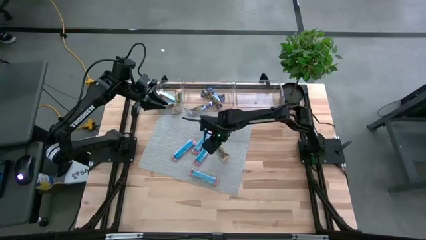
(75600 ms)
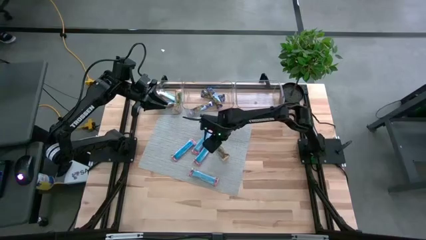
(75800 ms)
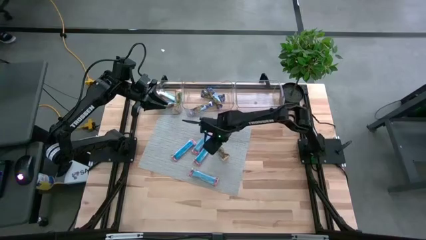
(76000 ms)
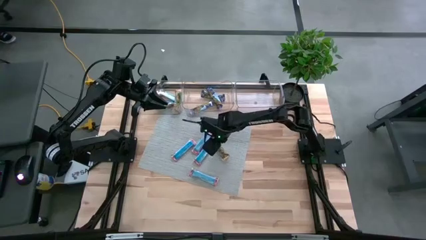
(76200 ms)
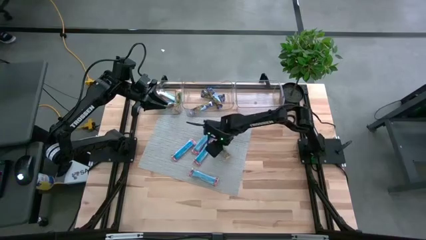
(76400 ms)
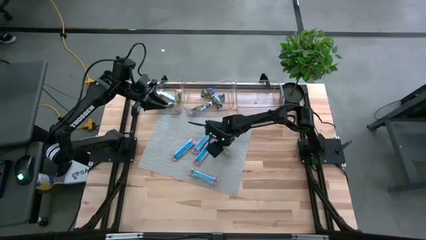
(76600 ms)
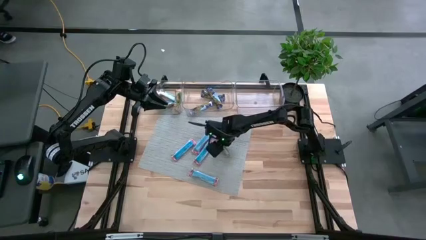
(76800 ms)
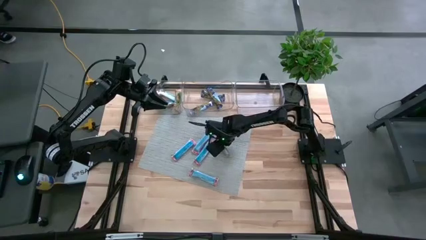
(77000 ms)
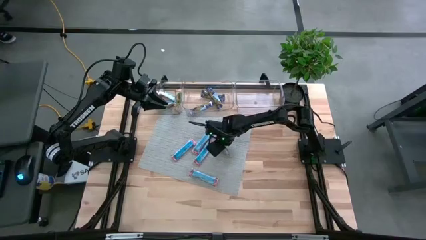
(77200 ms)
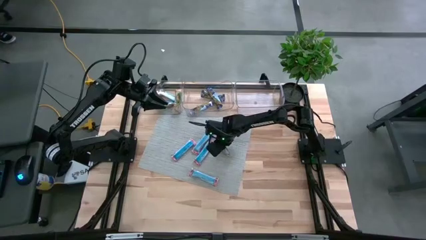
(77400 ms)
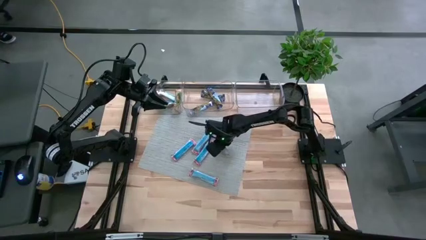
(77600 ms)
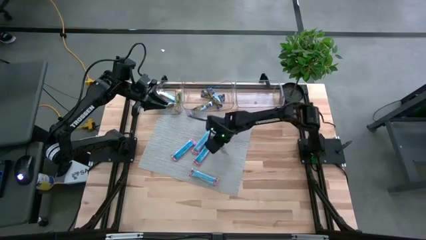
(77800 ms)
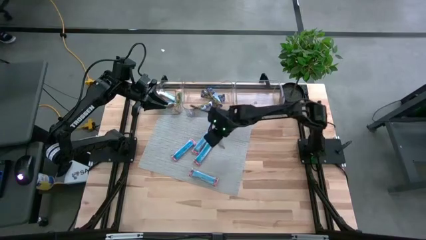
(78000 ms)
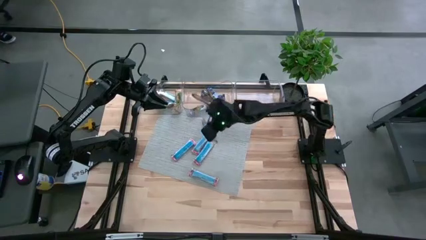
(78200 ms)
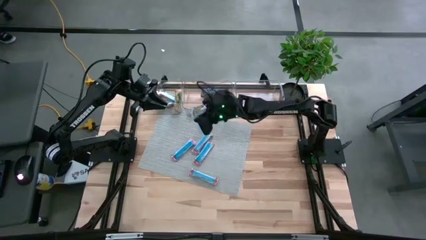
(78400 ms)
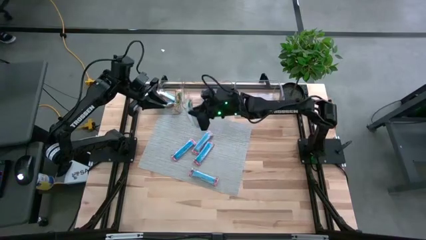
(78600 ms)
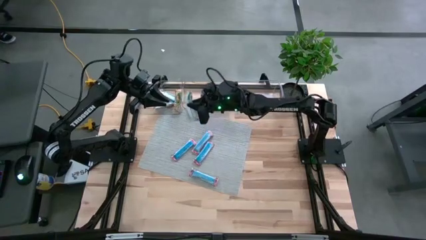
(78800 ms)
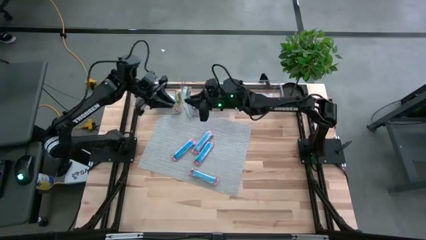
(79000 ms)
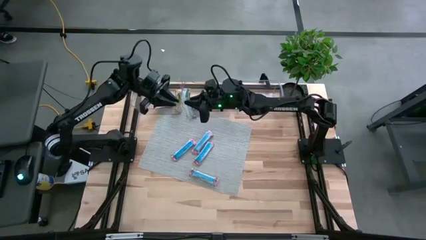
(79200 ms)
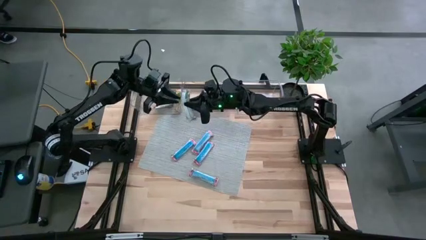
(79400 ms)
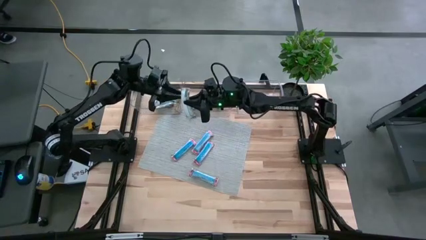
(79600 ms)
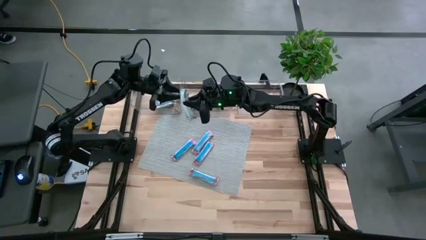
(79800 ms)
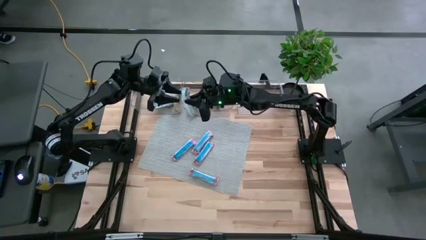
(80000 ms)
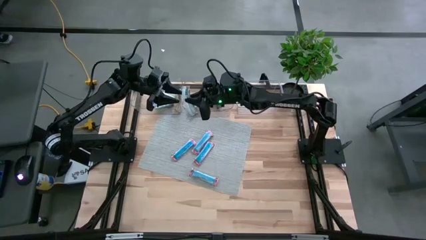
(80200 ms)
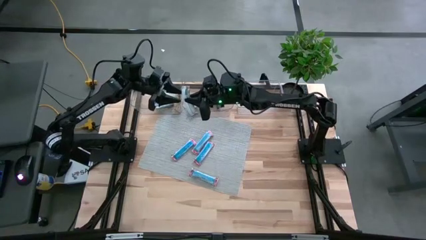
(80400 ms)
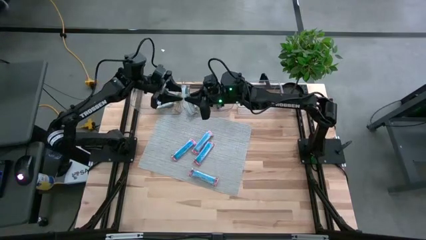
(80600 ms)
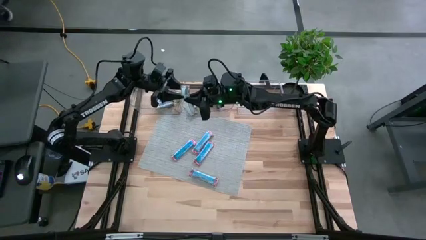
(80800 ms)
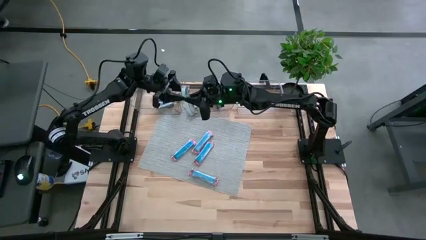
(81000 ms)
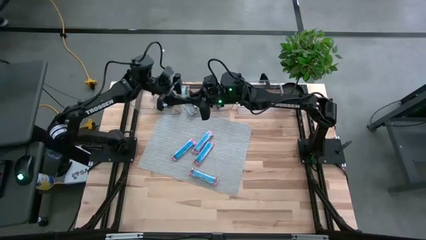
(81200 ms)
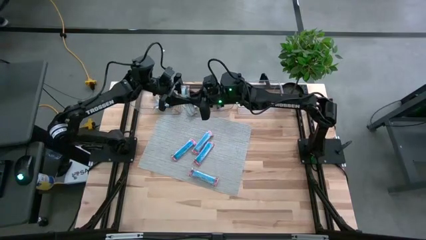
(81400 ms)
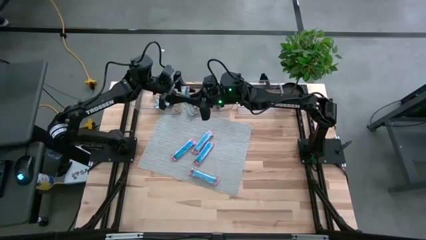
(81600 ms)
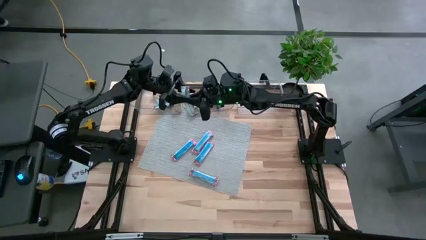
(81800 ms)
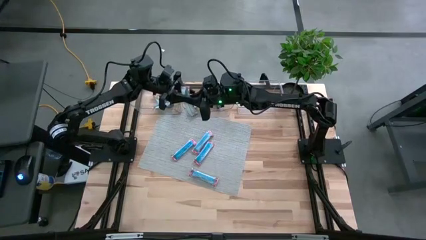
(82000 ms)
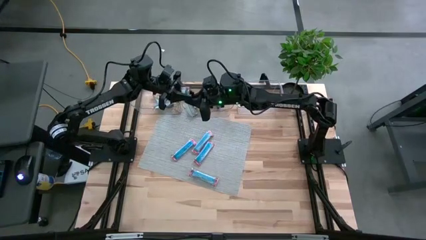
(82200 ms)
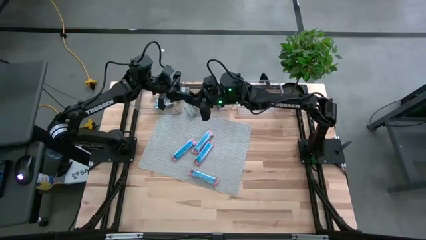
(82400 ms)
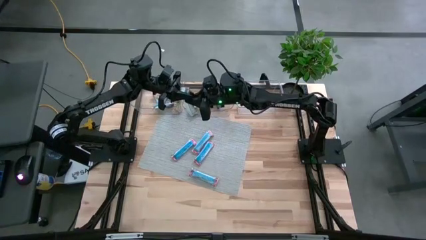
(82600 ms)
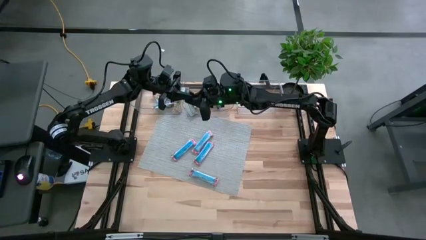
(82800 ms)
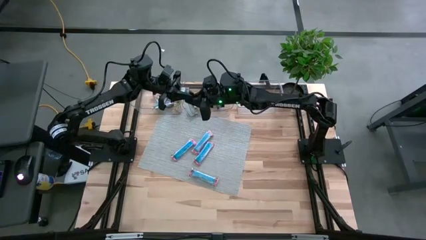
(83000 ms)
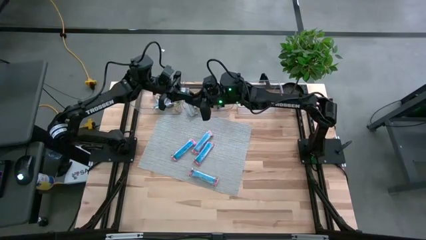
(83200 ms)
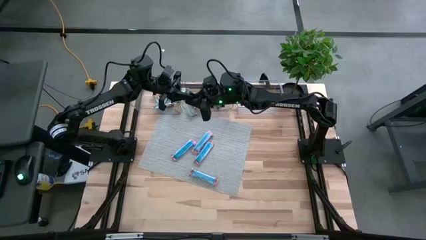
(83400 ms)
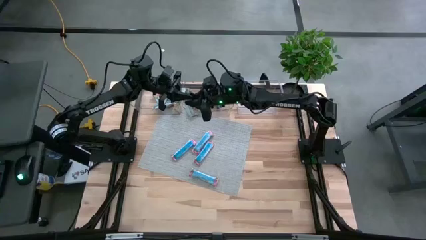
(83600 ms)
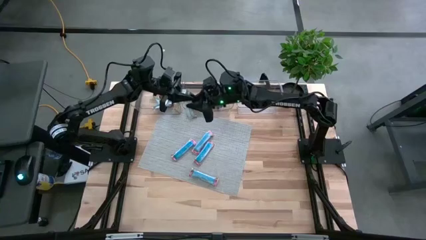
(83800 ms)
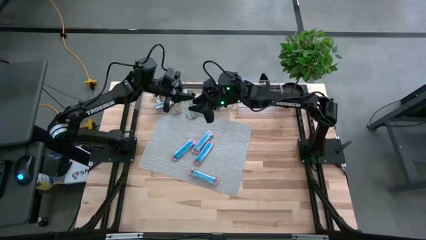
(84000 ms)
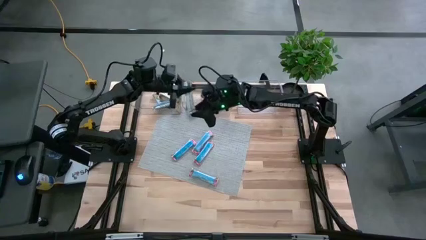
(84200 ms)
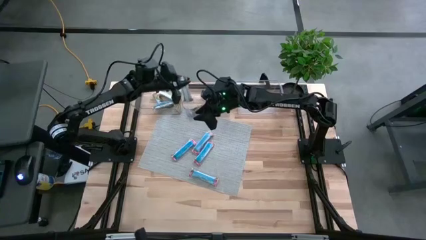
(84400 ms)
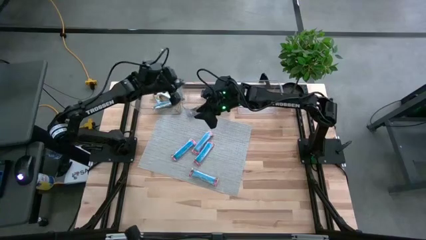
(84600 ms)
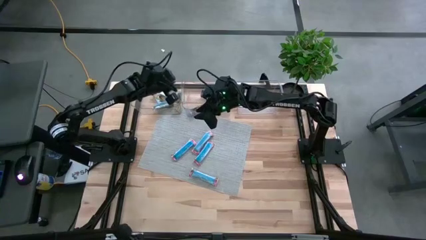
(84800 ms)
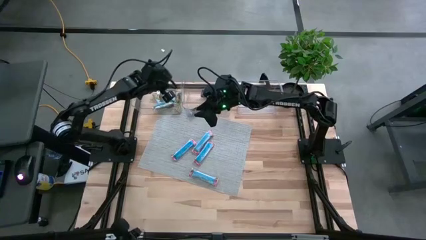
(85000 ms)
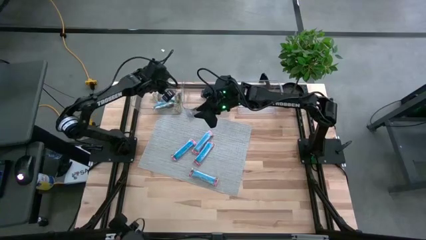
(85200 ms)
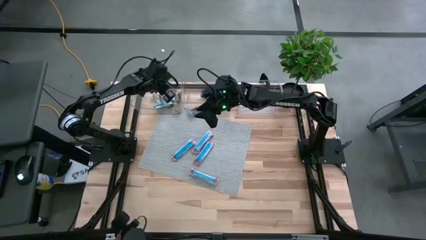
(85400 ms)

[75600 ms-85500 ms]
Task: Pick and place Granola Bars by type
Put the yellow granola bar into the left transparent bin

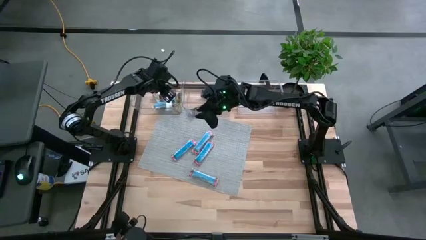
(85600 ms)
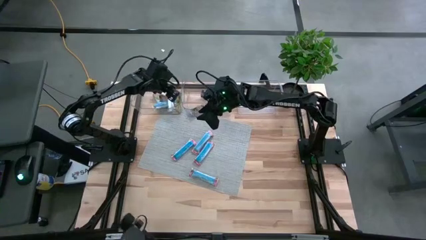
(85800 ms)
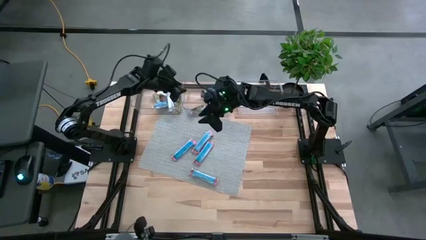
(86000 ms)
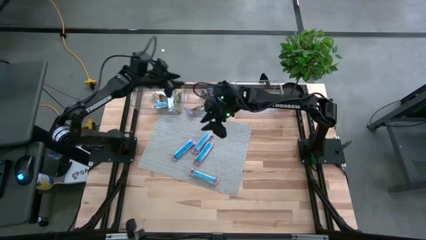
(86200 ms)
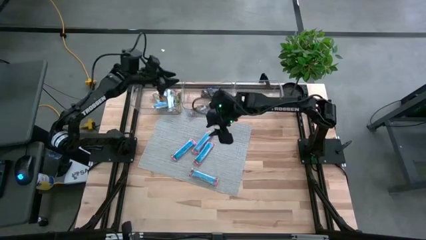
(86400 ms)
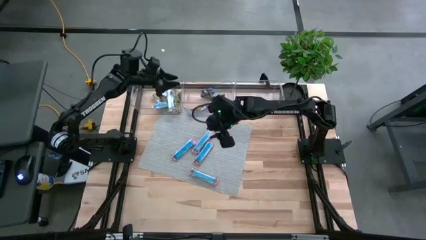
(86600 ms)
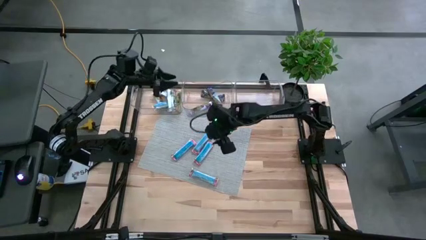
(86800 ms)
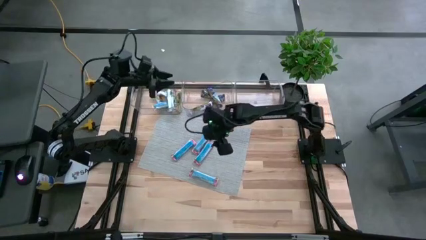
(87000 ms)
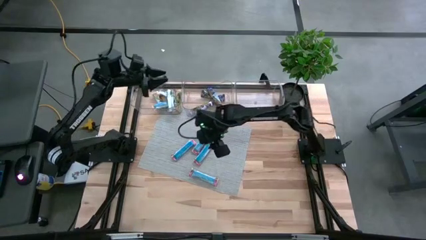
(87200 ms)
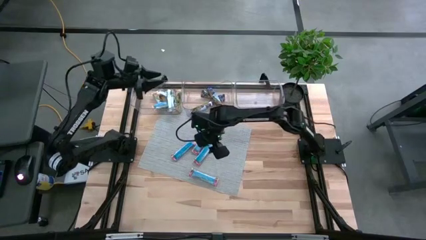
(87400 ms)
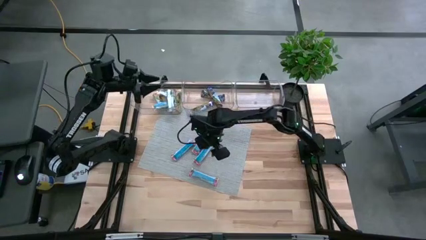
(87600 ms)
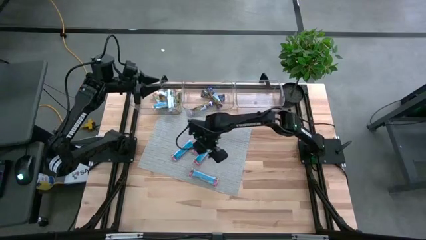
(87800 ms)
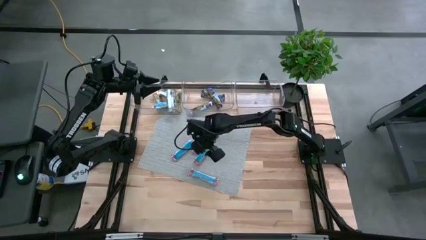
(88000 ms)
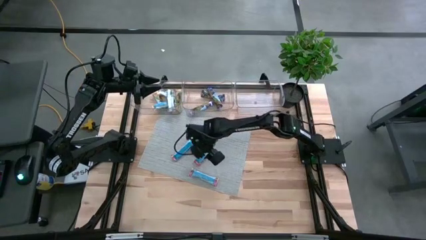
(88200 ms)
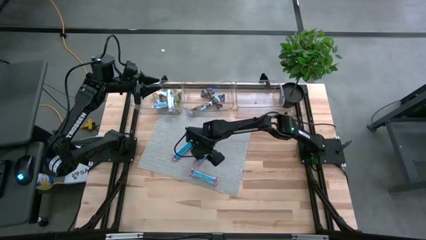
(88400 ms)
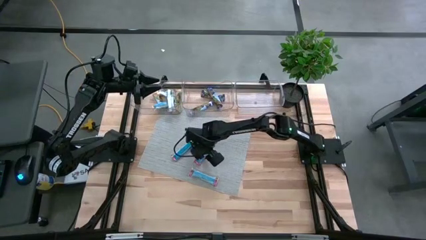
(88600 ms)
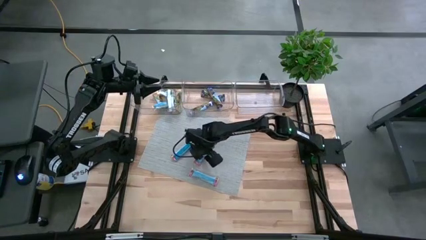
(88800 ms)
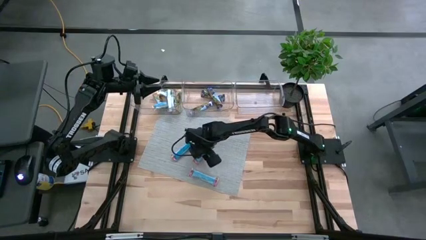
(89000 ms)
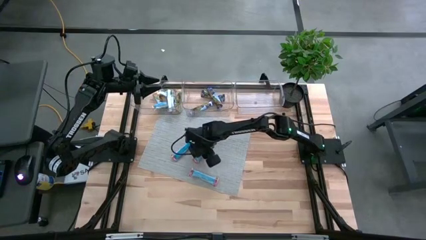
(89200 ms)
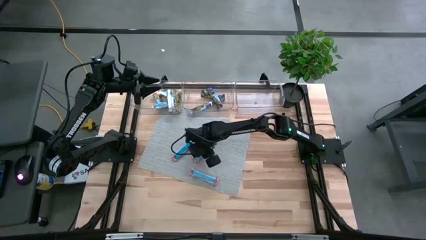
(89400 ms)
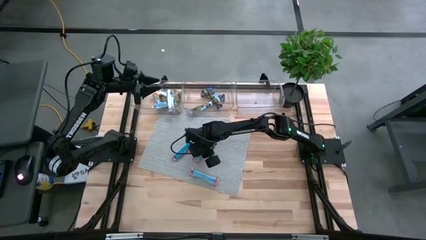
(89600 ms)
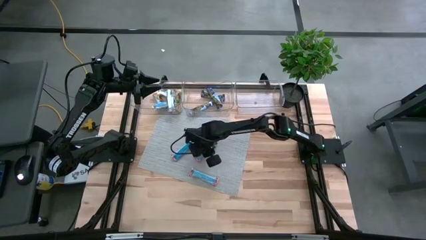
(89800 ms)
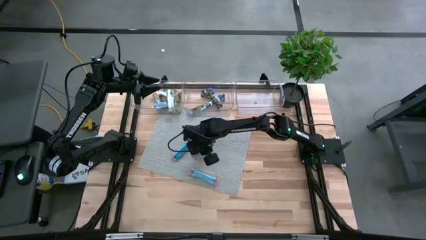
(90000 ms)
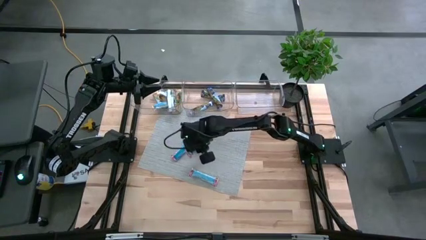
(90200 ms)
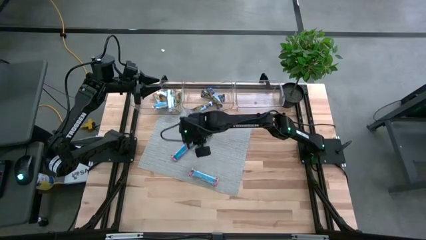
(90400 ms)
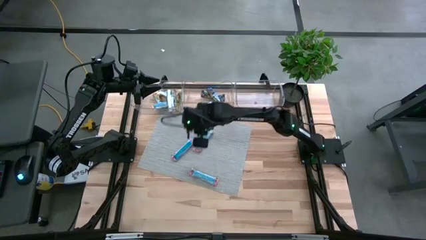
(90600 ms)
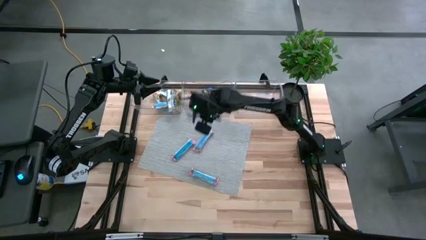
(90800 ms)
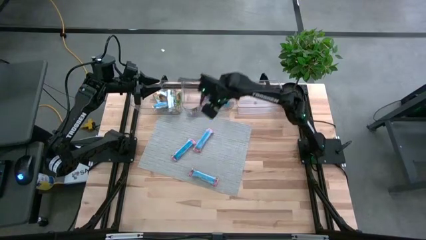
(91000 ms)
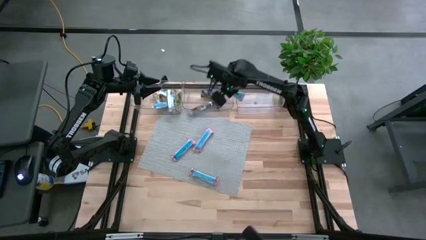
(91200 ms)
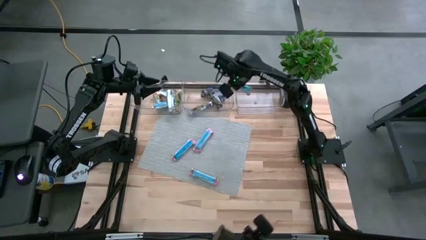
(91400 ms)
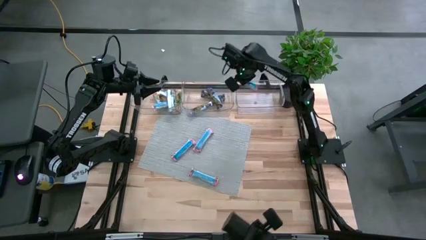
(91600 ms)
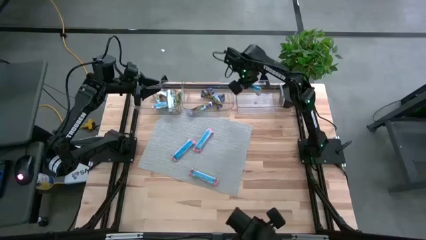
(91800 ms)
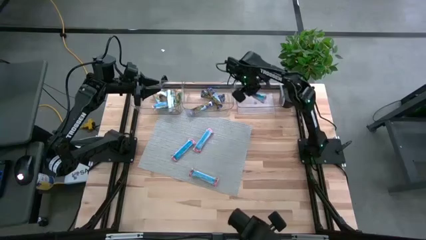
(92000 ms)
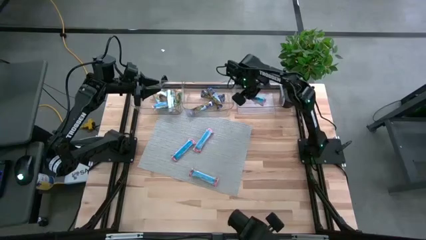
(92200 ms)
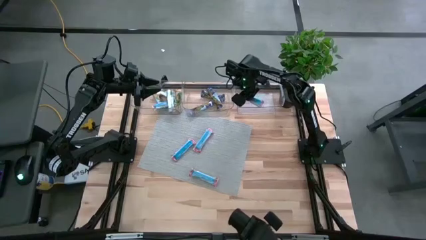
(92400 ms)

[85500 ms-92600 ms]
Put the red granola bar into the right transparent bin
